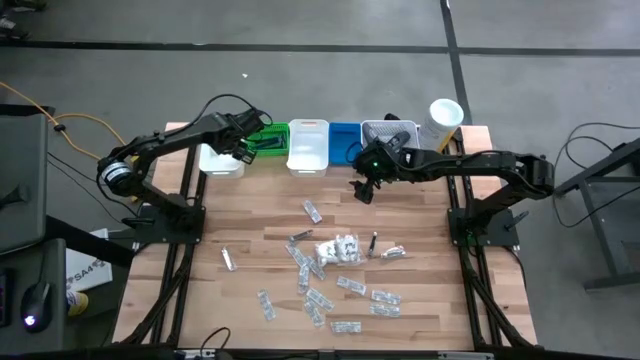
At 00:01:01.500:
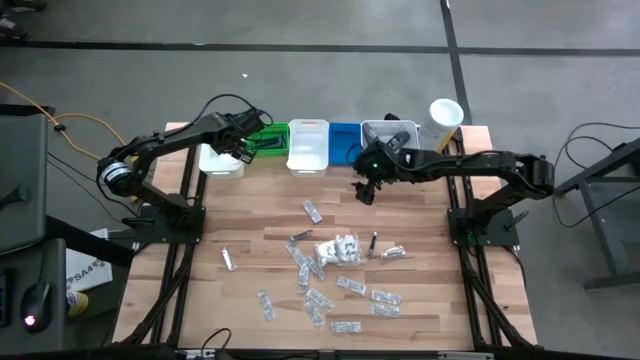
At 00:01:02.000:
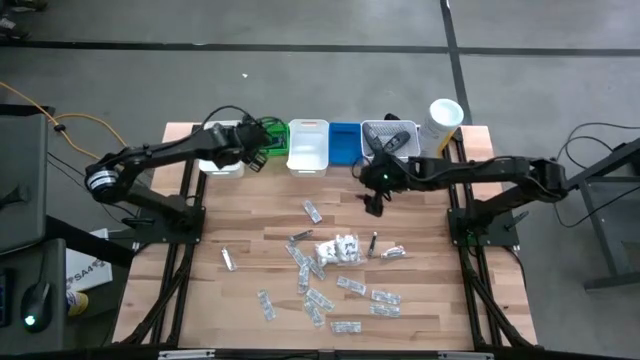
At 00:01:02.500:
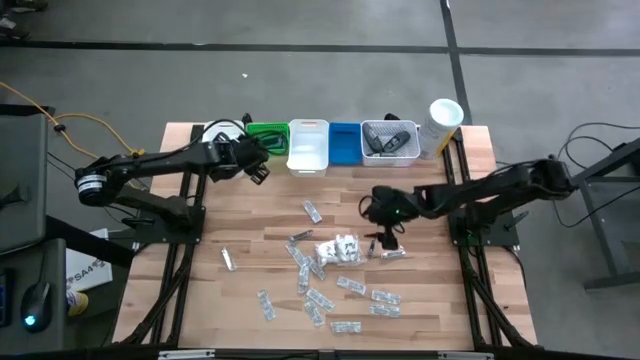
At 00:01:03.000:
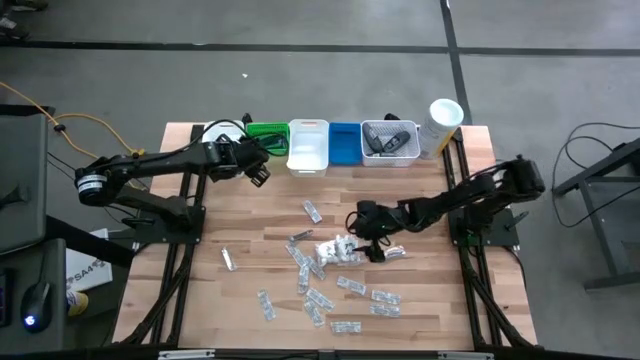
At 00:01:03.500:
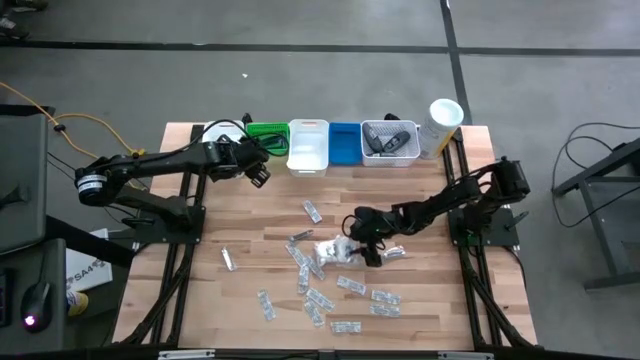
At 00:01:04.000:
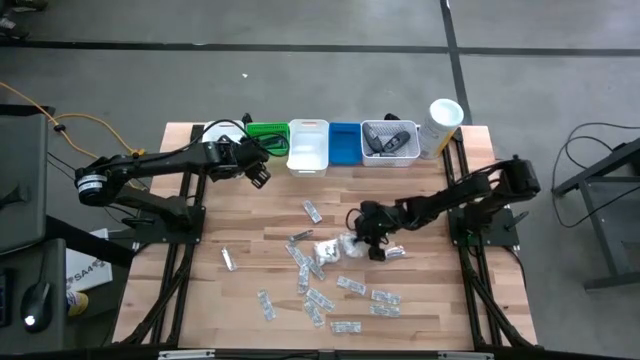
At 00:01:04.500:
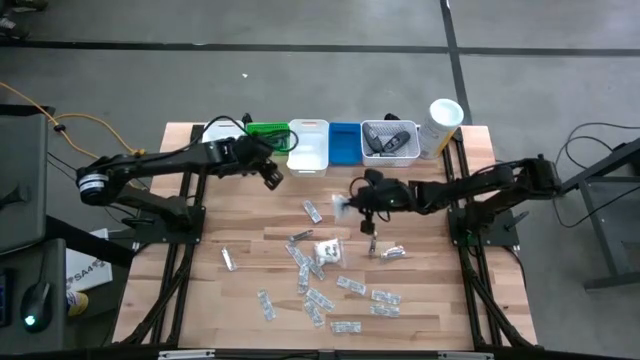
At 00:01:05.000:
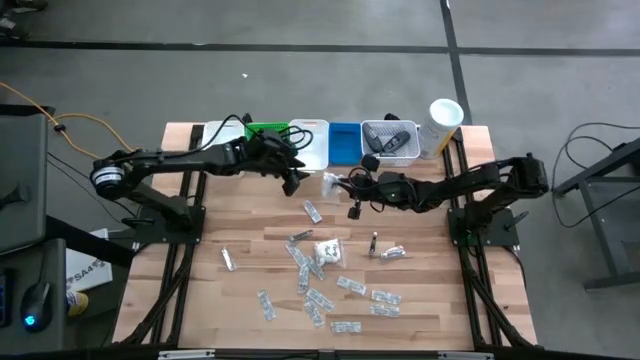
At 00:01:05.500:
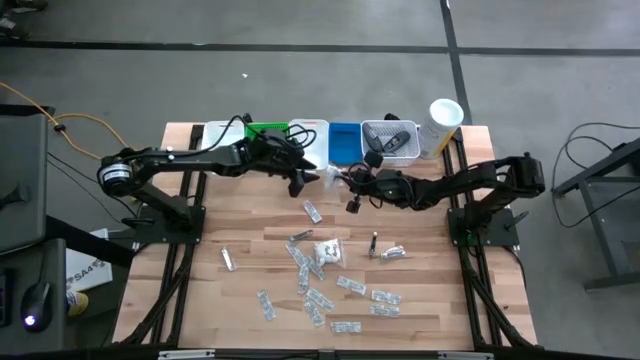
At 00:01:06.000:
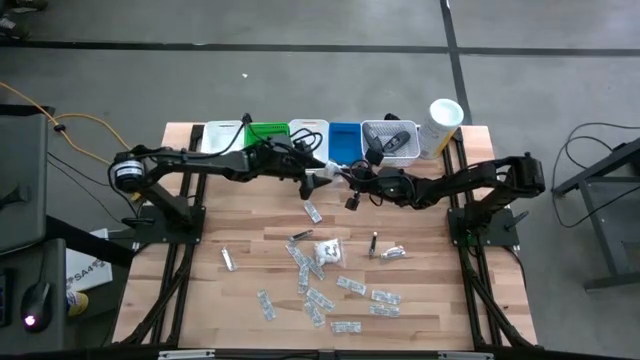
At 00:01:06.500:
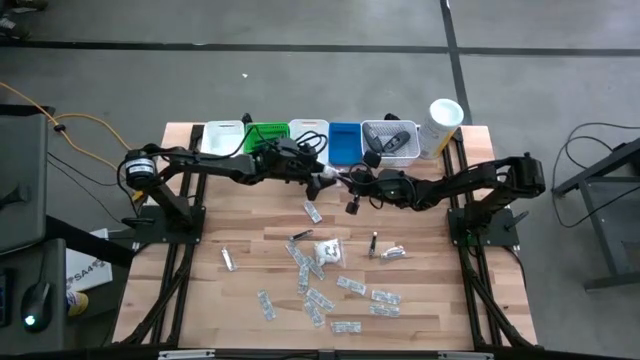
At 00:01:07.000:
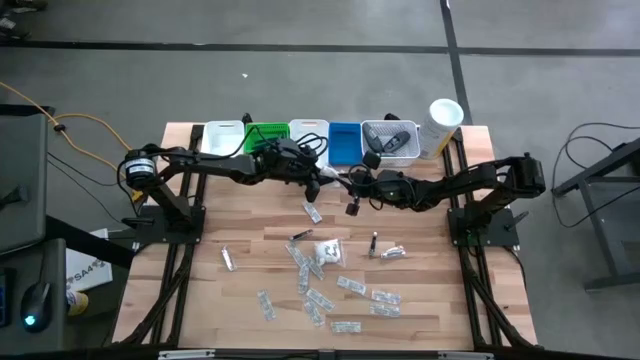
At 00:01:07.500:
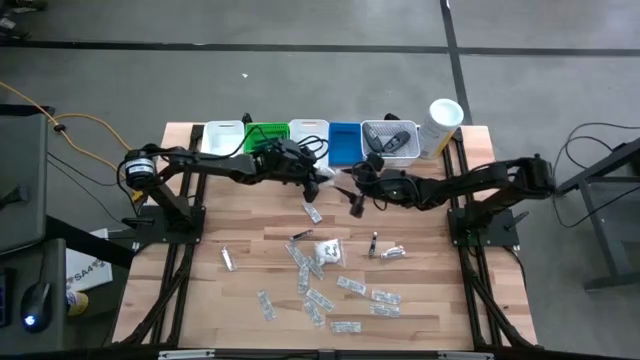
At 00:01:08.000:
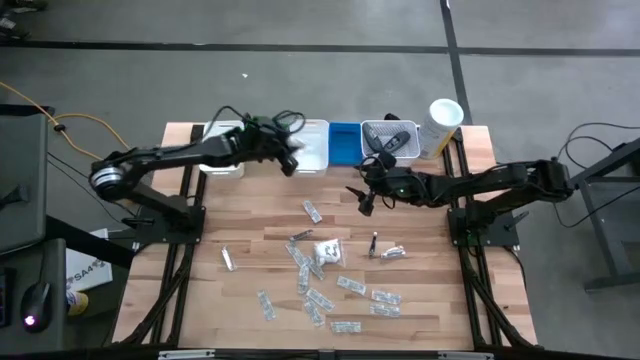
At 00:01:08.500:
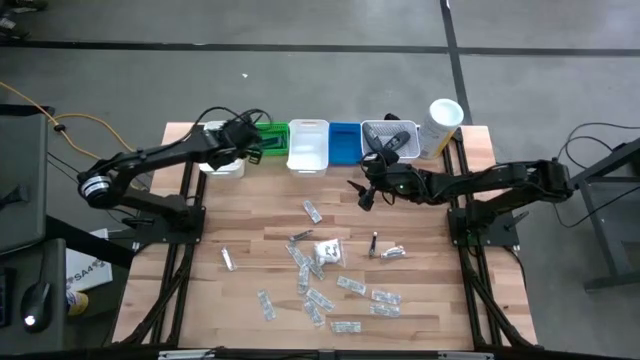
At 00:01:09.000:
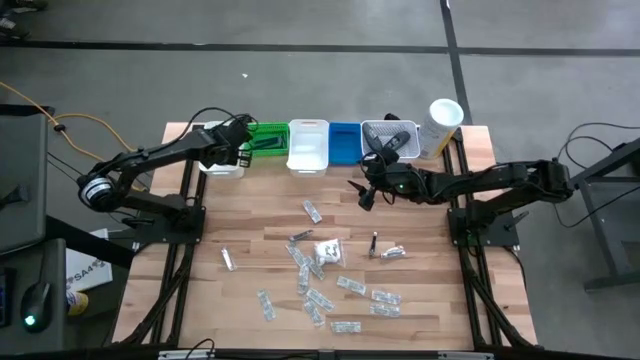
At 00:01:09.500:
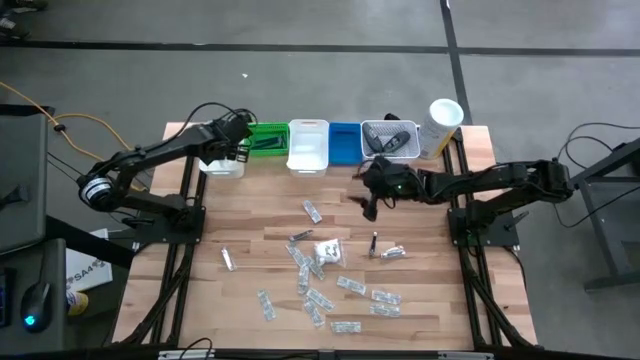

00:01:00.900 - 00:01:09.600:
Task: Pick & Place Travel size toiletries
Put the transparent cotton pack into the left white bin

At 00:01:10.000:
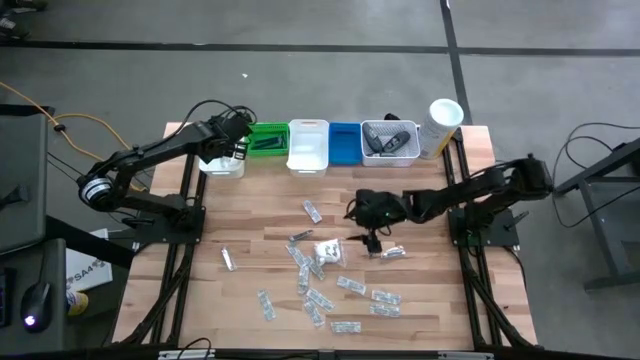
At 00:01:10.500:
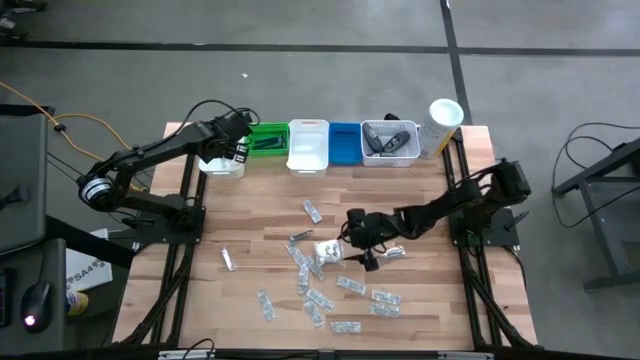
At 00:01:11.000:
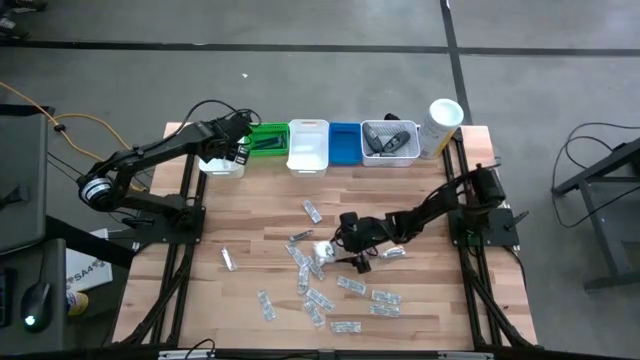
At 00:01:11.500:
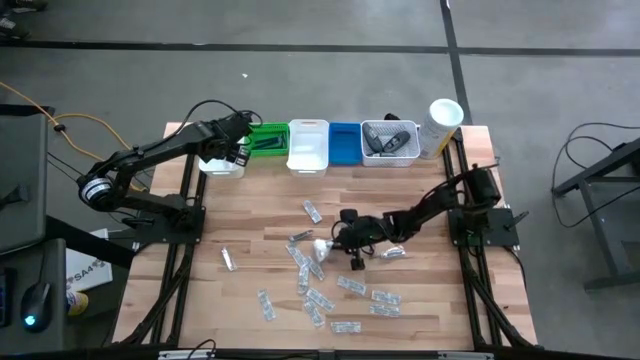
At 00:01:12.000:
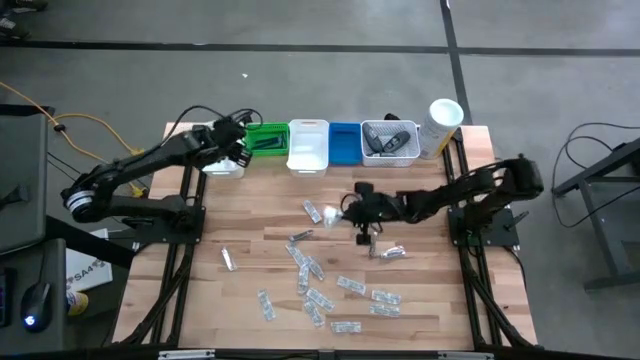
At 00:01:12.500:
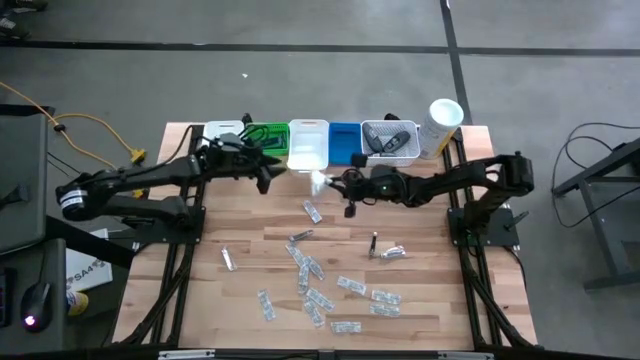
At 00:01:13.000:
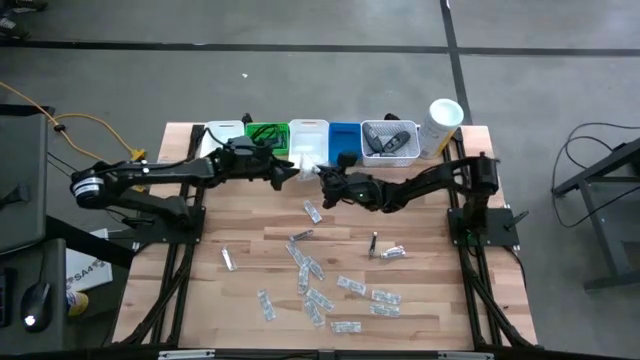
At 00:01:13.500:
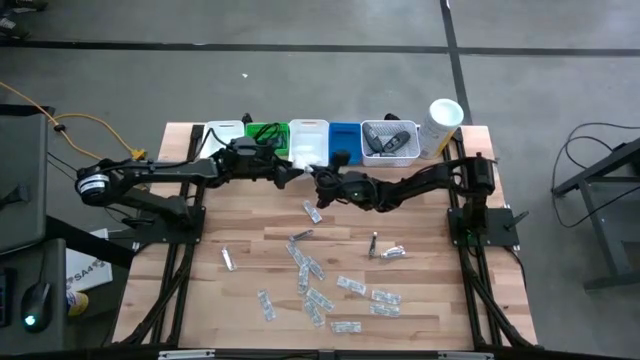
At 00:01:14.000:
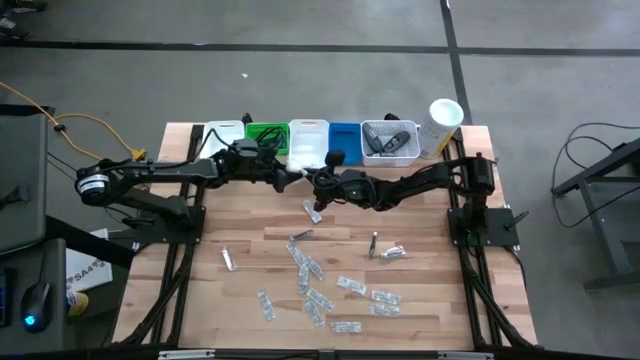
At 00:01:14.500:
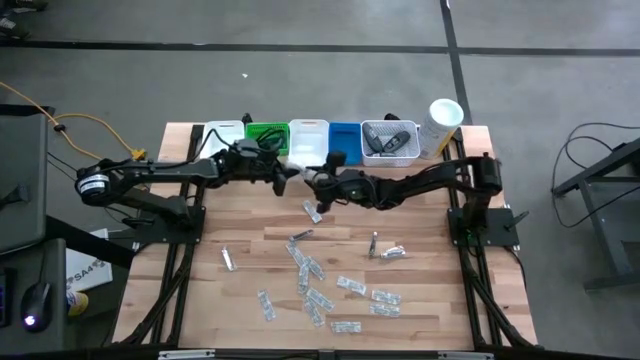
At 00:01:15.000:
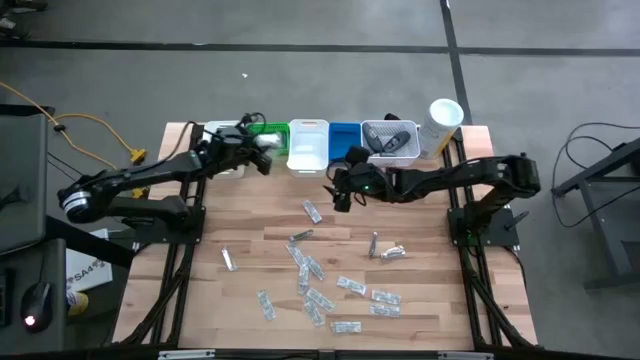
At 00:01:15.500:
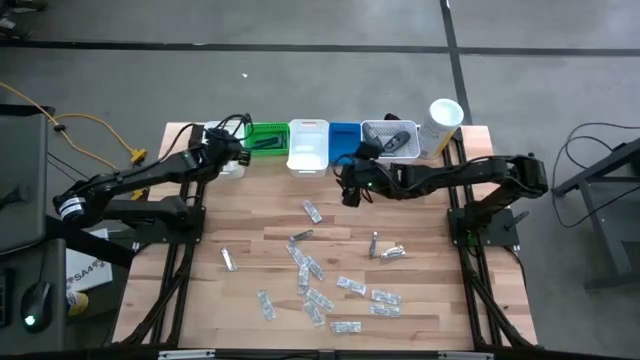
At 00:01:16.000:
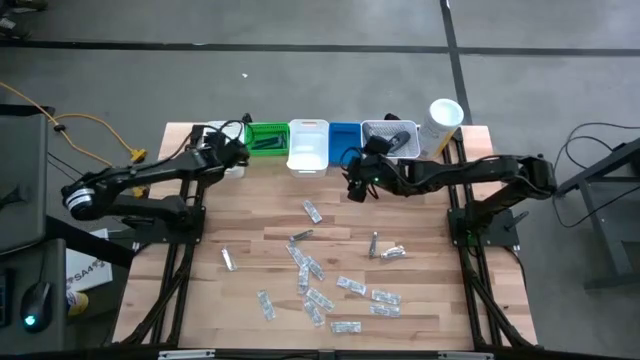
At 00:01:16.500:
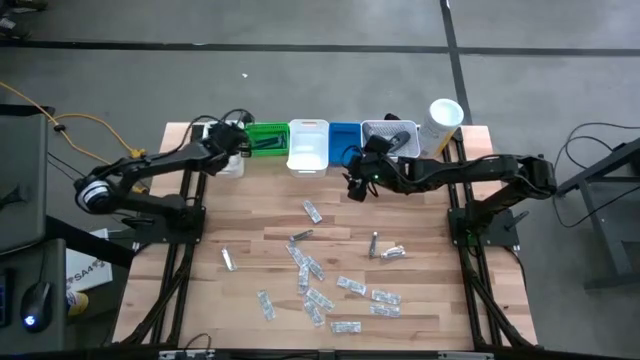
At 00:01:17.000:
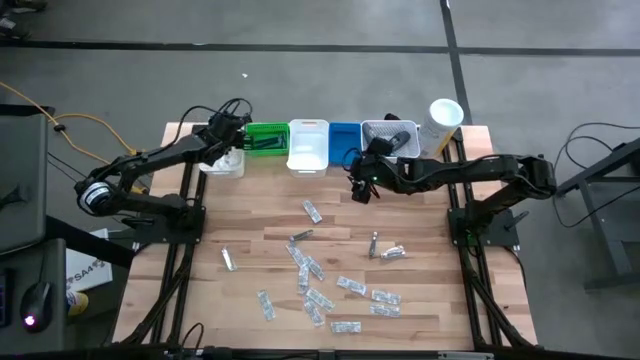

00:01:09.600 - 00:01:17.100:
Put the transparent cotton pack into the left white bin

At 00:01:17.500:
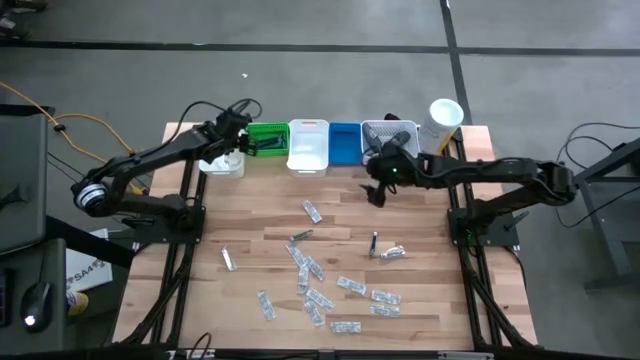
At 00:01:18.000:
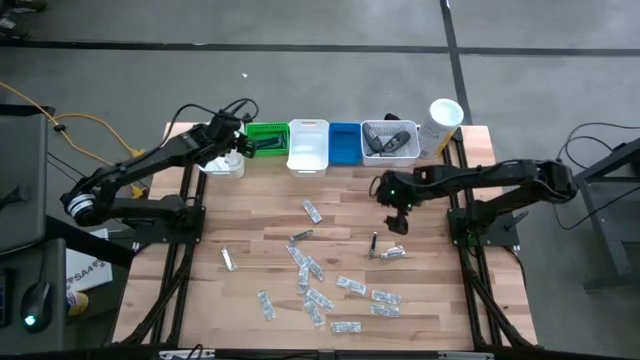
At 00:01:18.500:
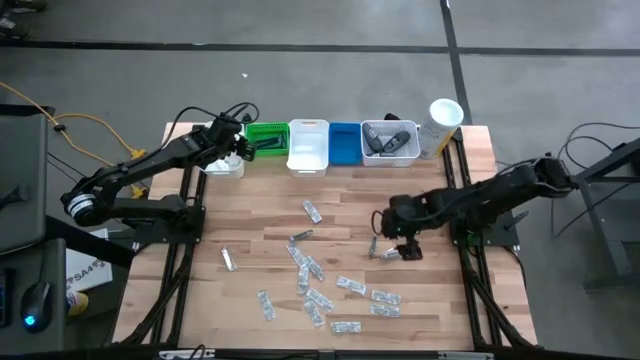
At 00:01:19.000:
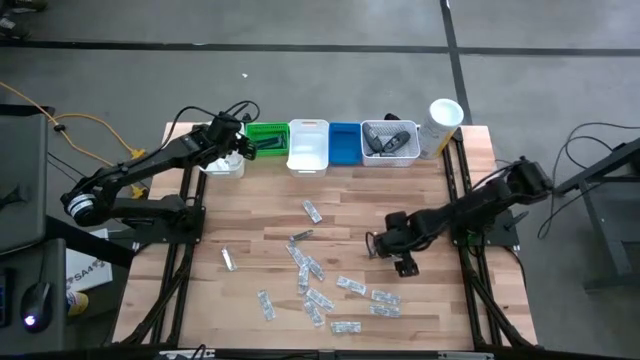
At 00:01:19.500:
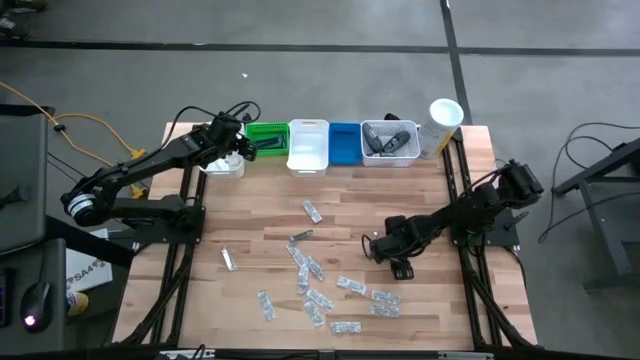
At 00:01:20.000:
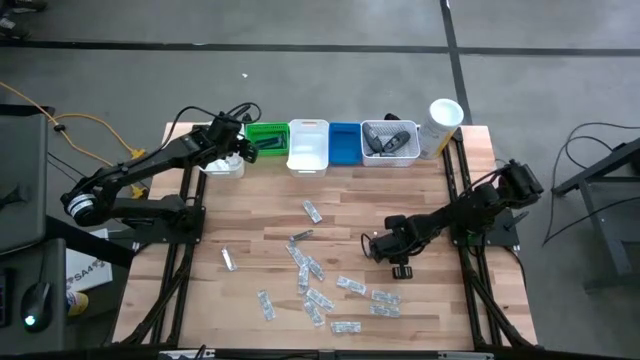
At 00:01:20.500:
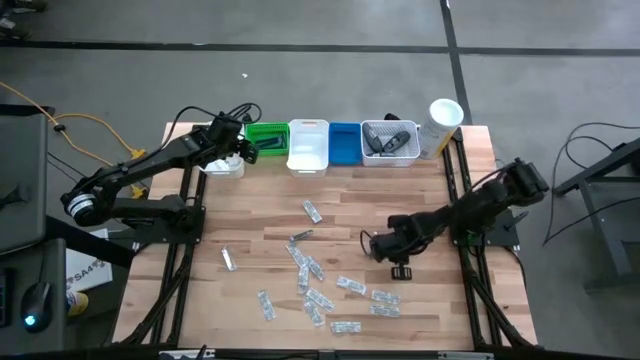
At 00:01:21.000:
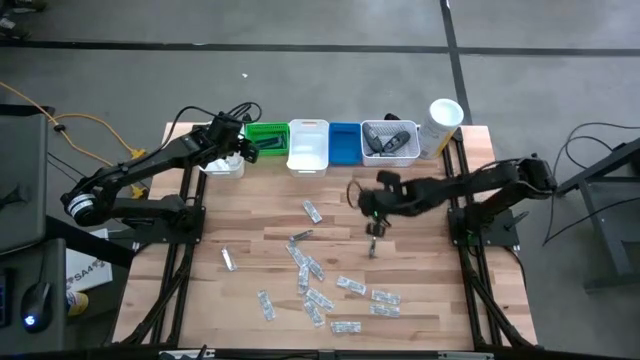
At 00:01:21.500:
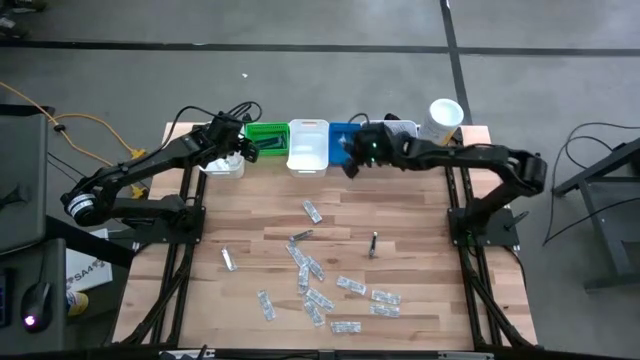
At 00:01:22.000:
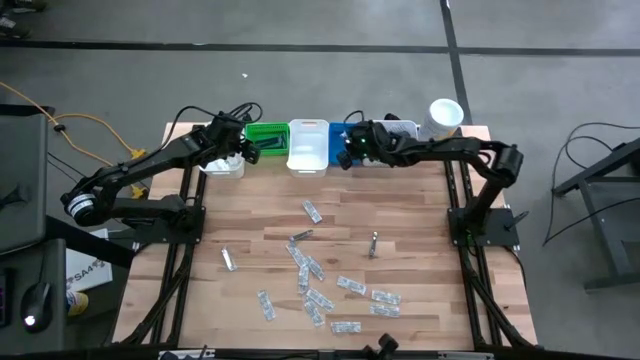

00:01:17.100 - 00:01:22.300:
Put the silver nail cutter into the blue bin
